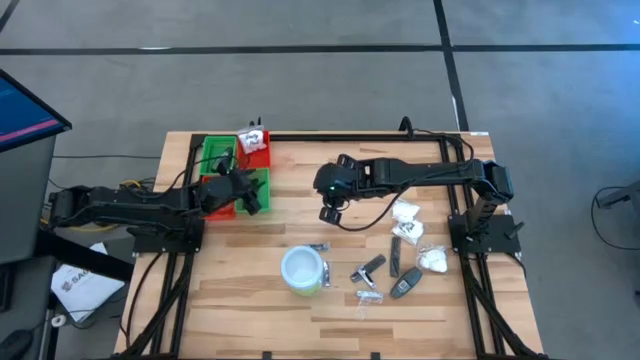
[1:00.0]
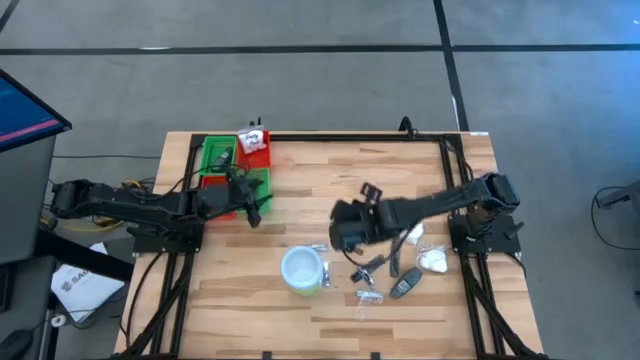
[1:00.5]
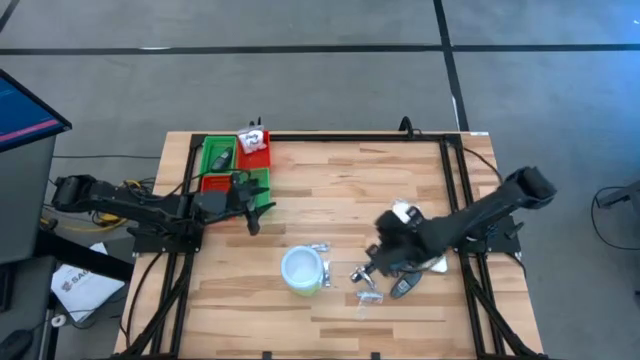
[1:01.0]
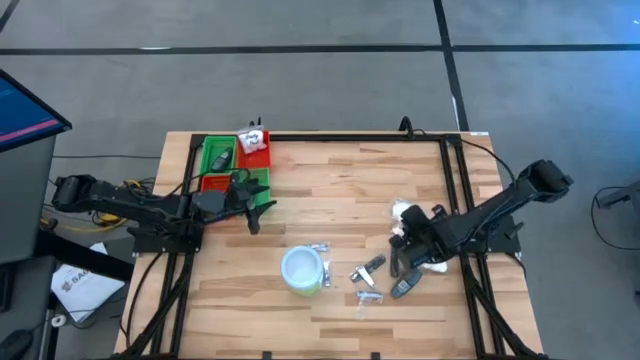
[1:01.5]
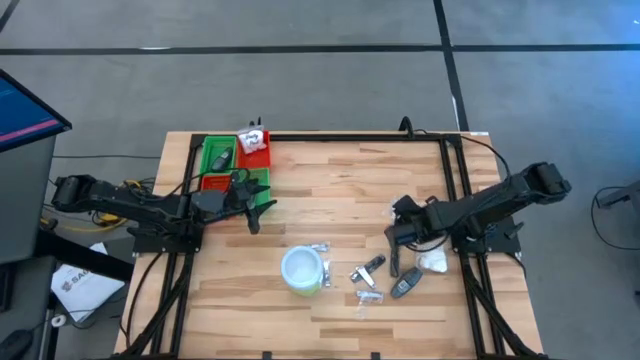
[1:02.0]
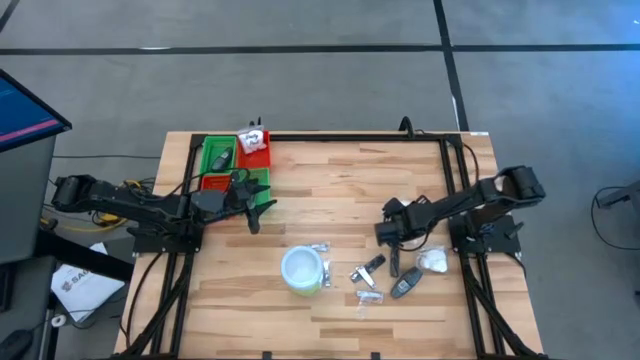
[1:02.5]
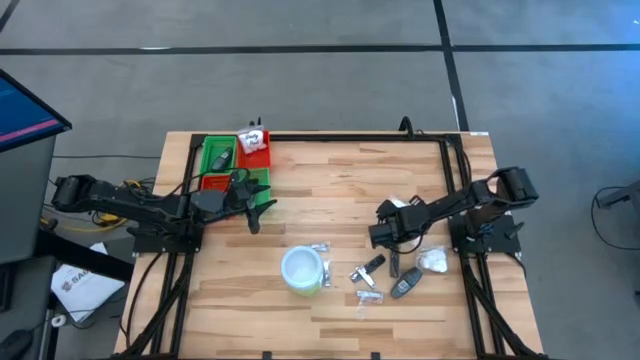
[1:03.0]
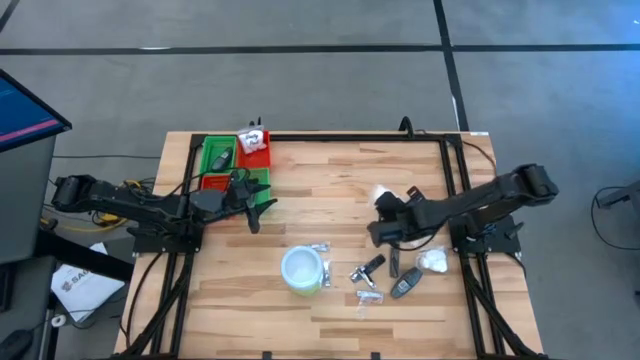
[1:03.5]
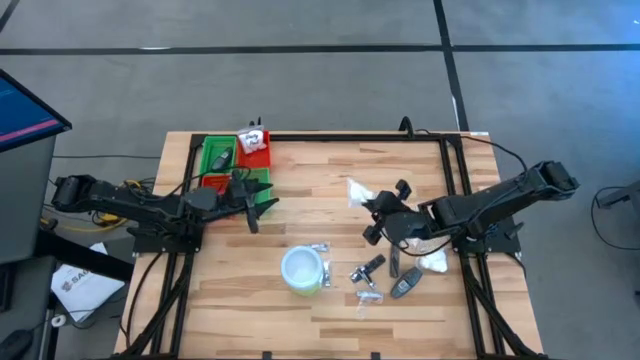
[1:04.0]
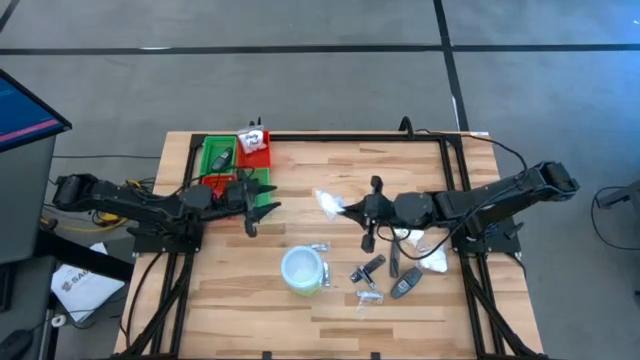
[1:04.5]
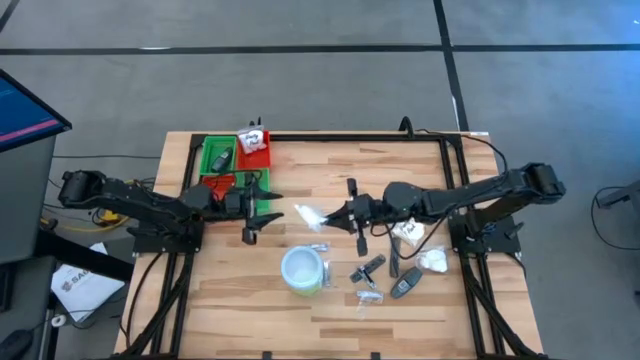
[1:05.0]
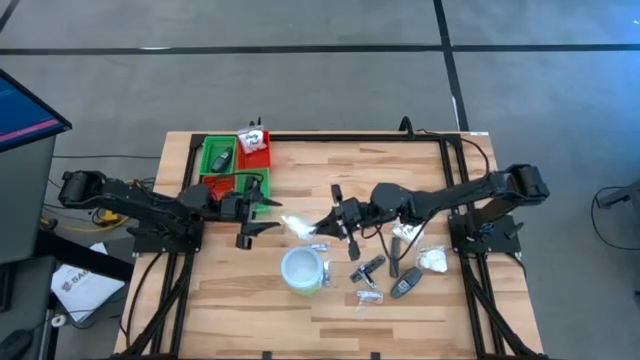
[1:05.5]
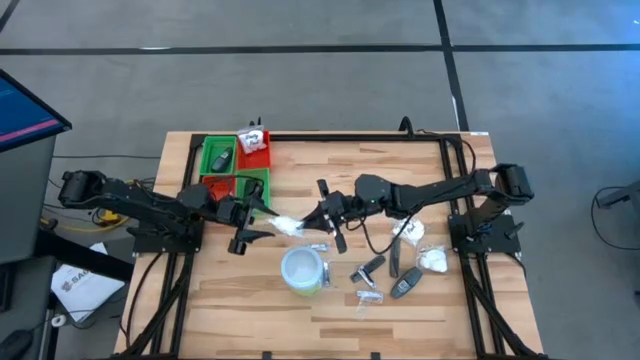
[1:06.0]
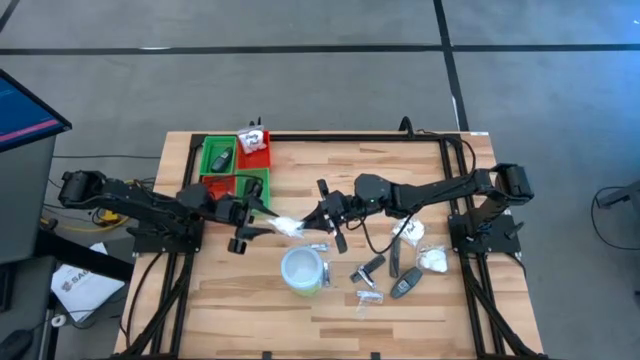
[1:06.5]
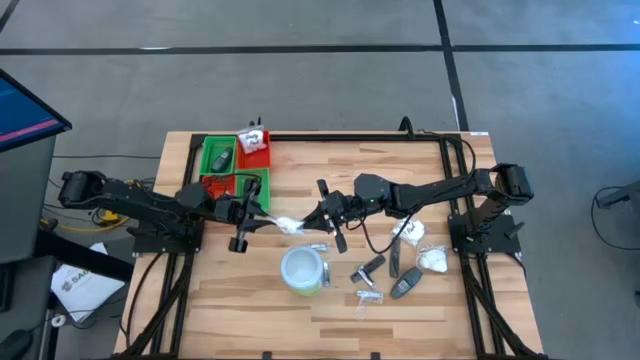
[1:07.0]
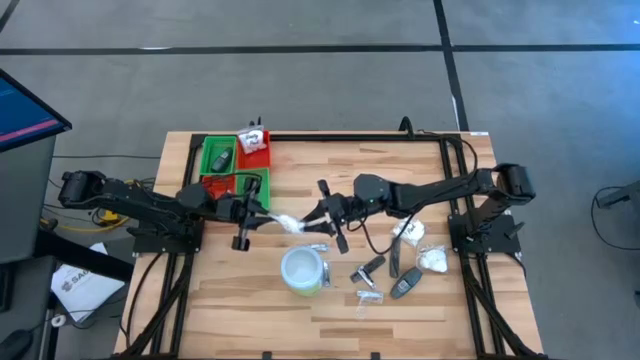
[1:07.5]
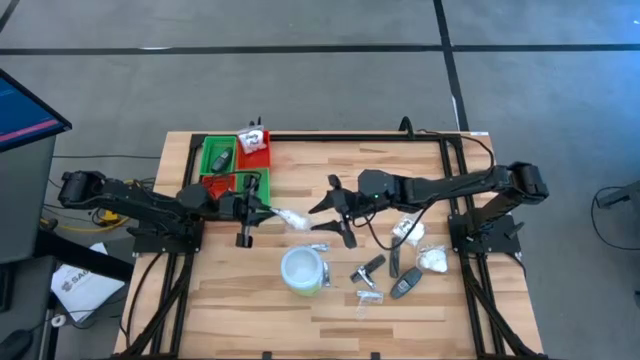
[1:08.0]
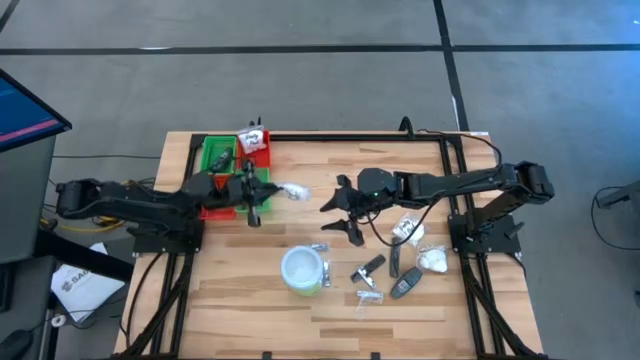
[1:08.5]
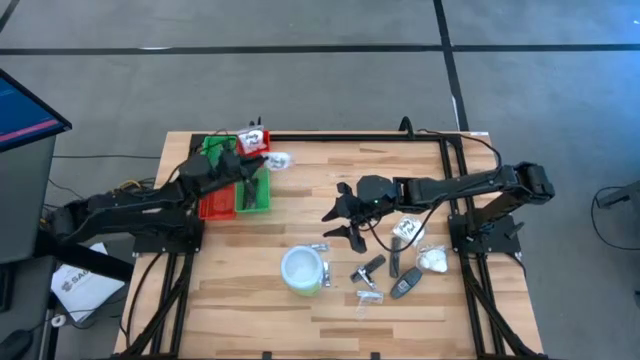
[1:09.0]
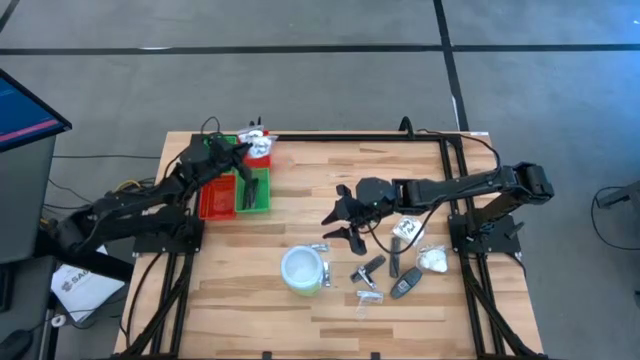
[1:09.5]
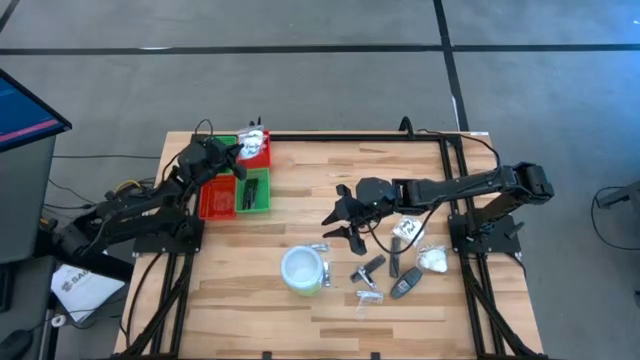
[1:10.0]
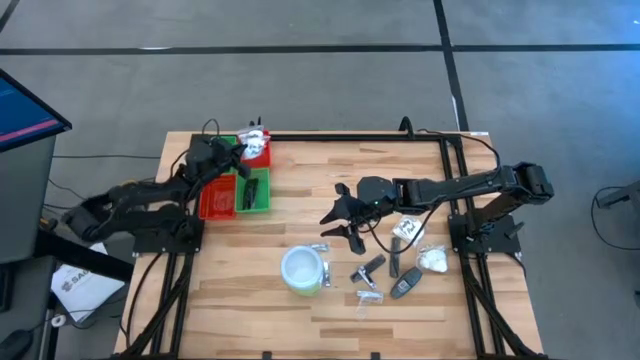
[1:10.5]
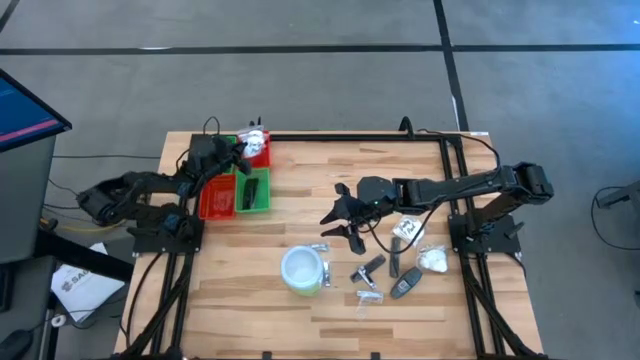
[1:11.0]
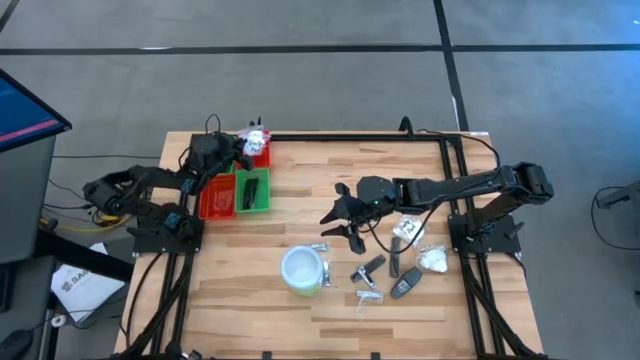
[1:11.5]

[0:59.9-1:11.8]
Task: Pick & Place Travel size toiletries
Put the white cotton pack into the top red bin

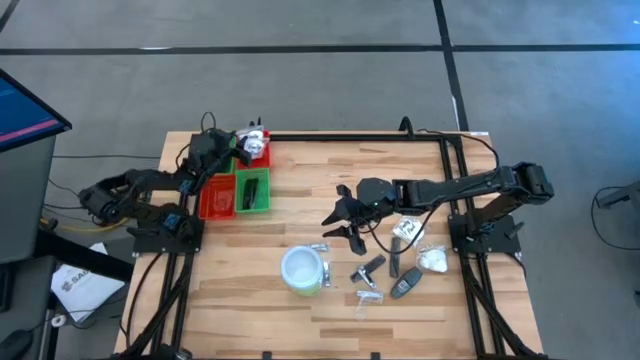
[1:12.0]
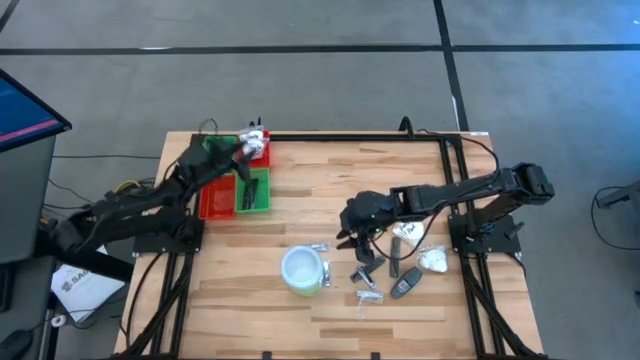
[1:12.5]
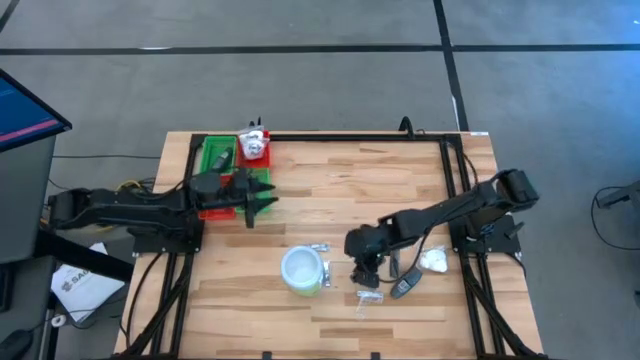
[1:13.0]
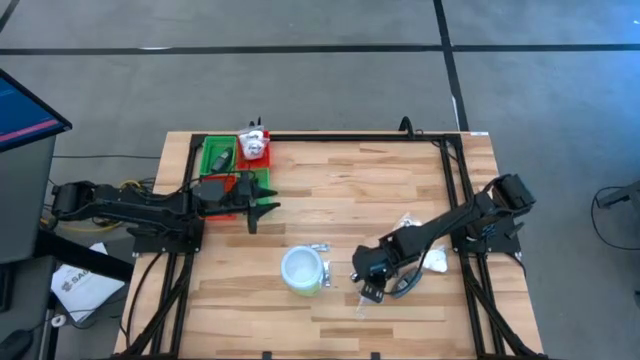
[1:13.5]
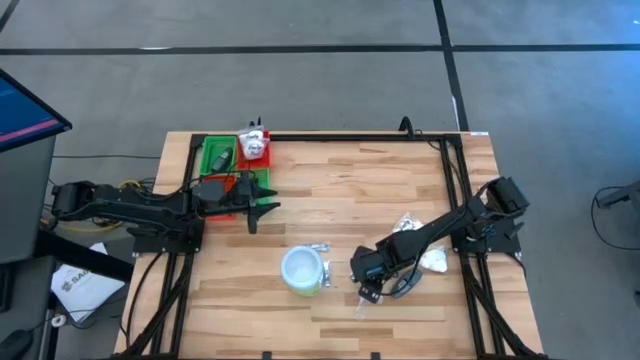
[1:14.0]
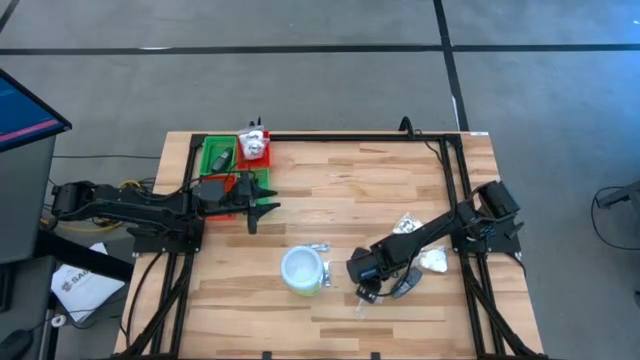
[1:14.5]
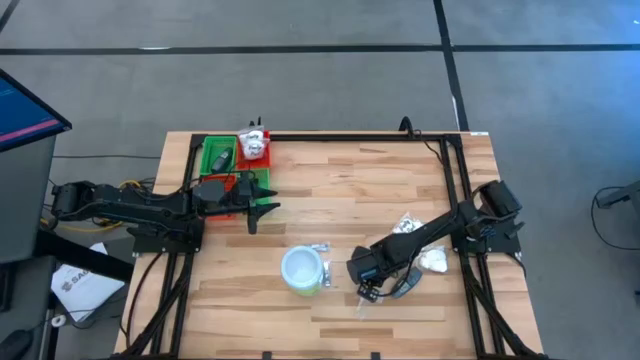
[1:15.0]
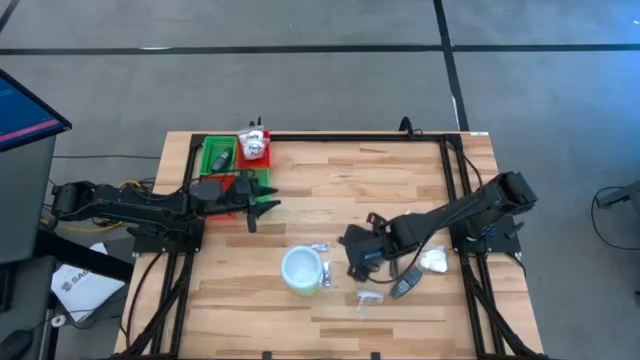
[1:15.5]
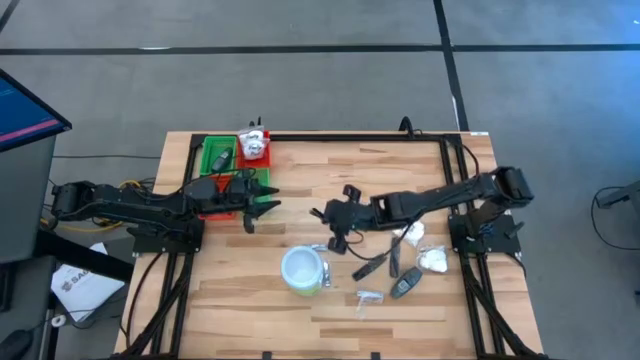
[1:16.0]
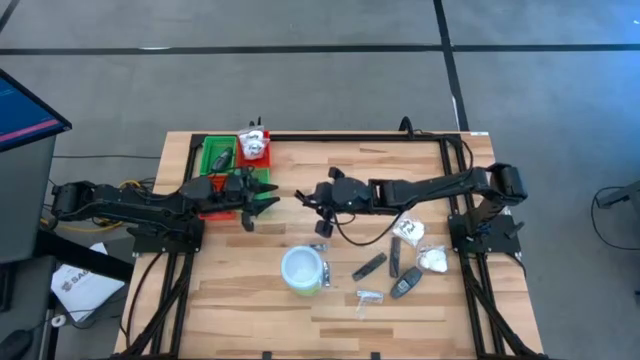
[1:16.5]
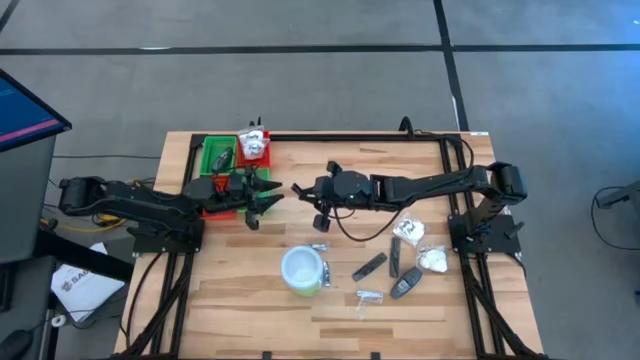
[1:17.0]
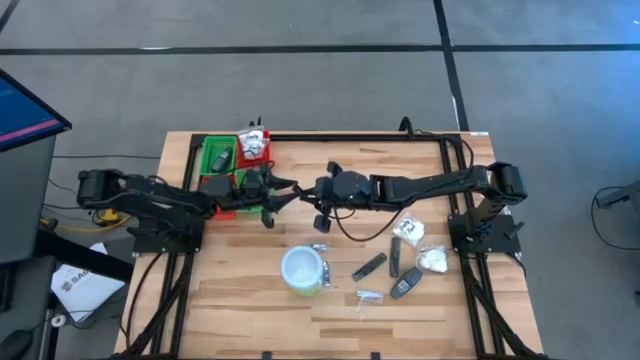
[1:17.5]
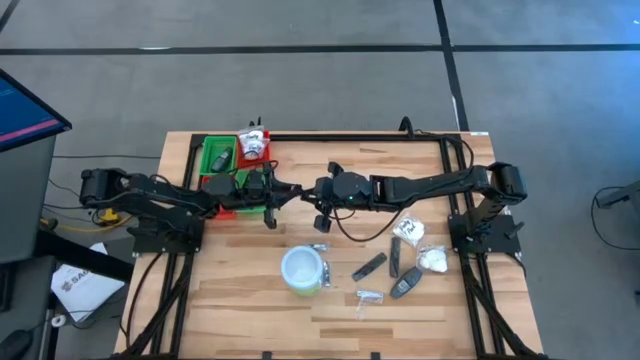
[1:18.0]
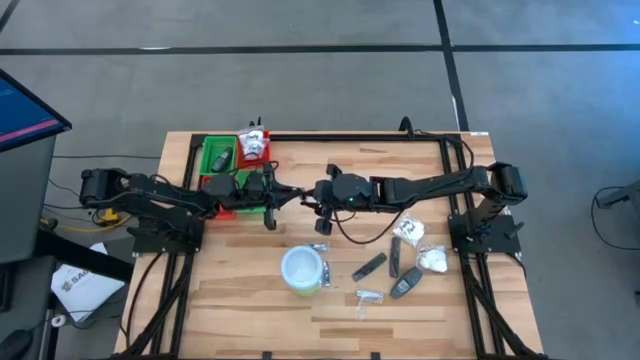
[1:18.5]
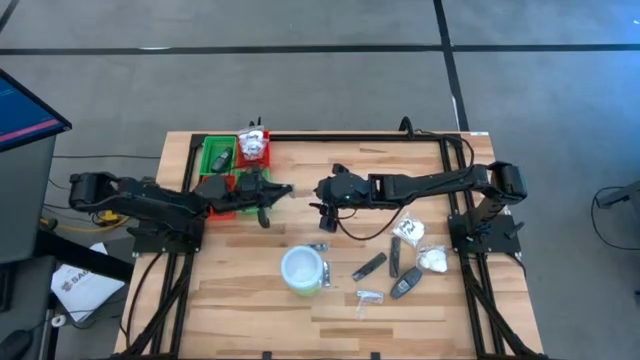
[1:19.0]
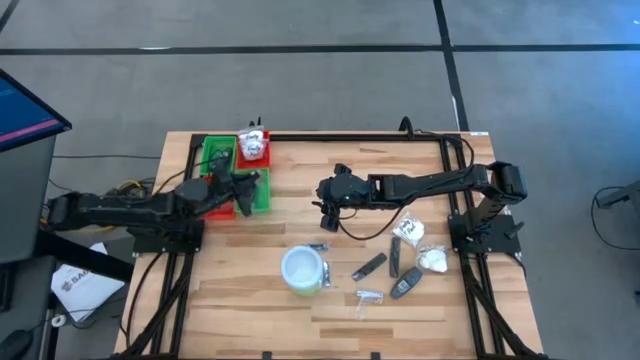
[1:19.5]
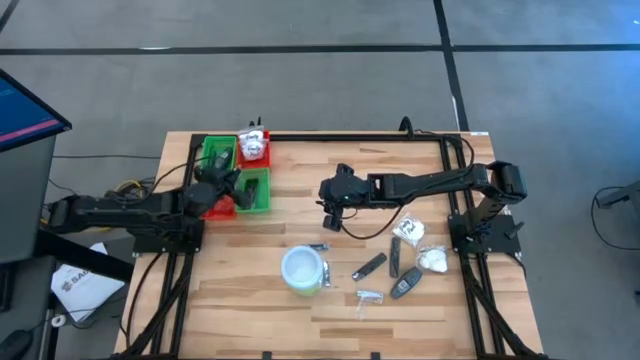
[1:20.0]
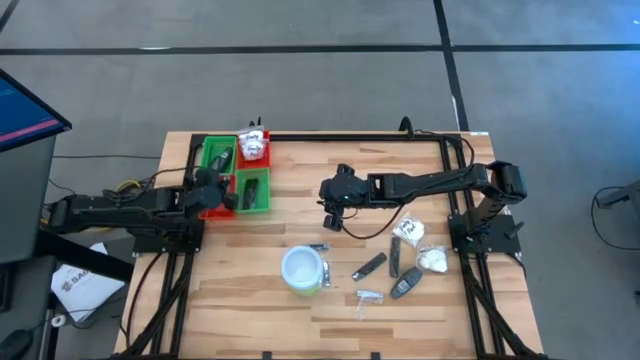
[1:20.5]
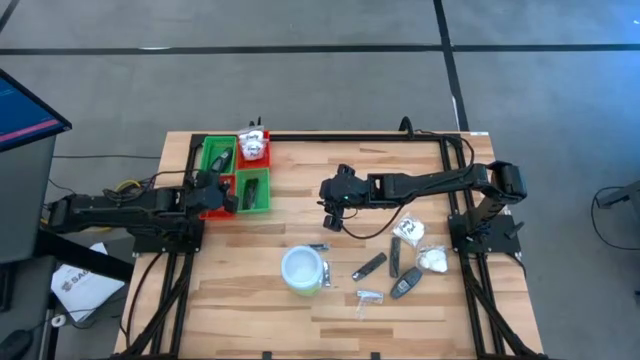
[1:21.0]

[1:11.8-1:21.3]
Put the silver nail cutter into the bottom red bin
